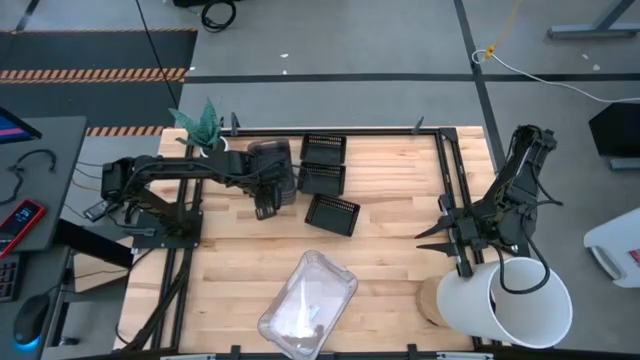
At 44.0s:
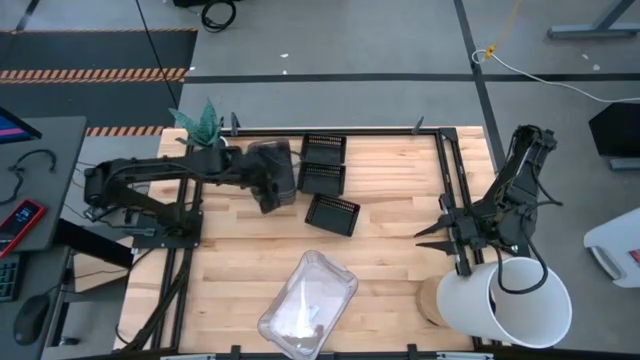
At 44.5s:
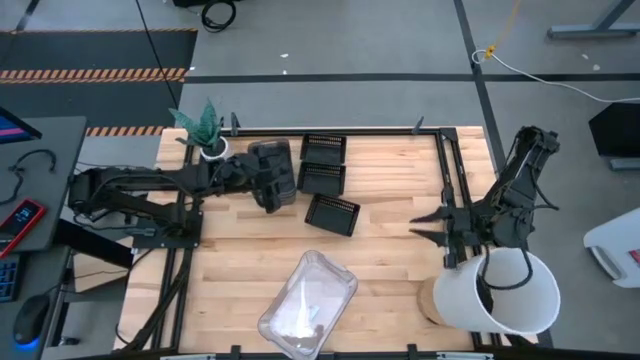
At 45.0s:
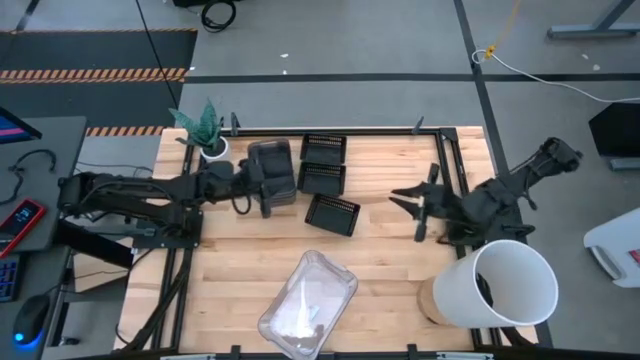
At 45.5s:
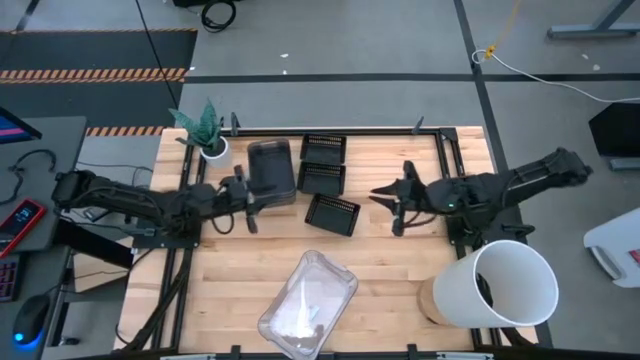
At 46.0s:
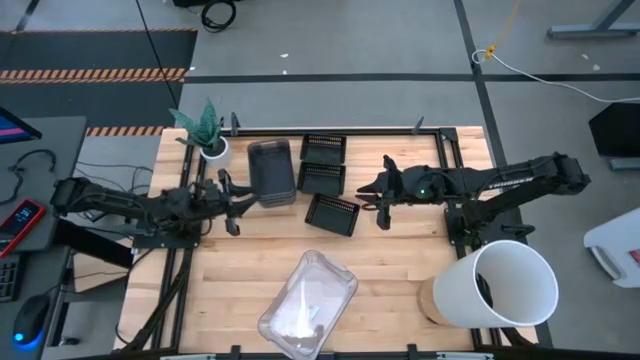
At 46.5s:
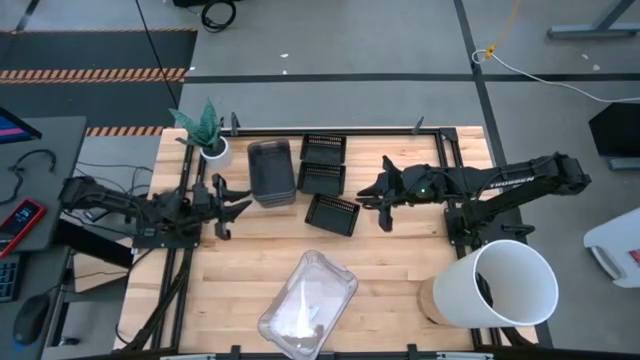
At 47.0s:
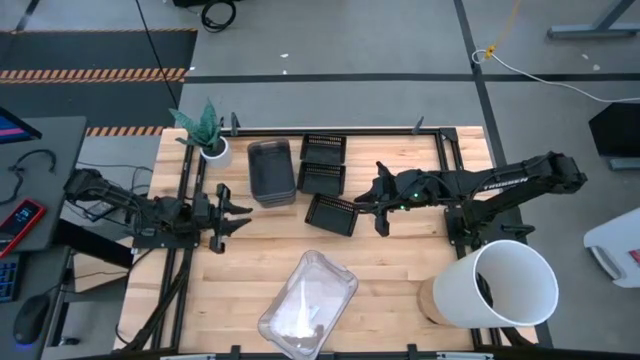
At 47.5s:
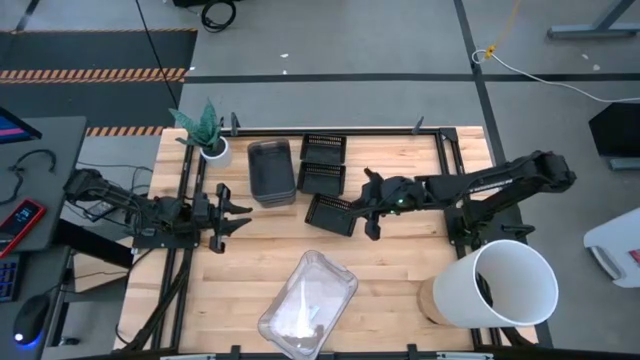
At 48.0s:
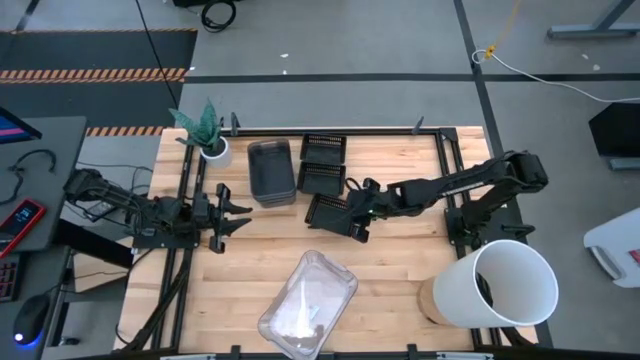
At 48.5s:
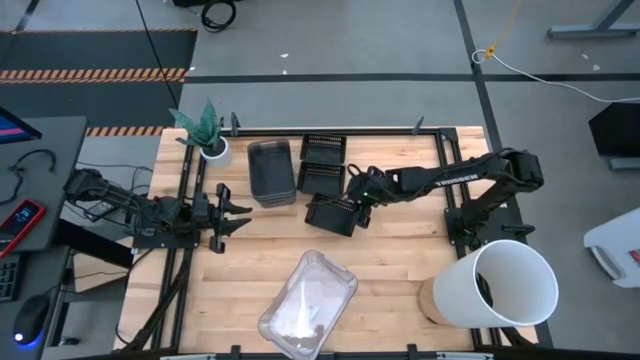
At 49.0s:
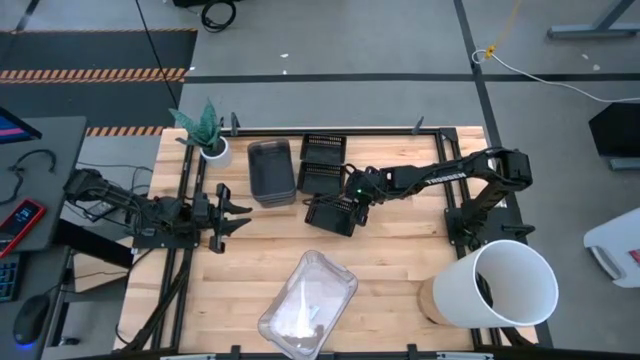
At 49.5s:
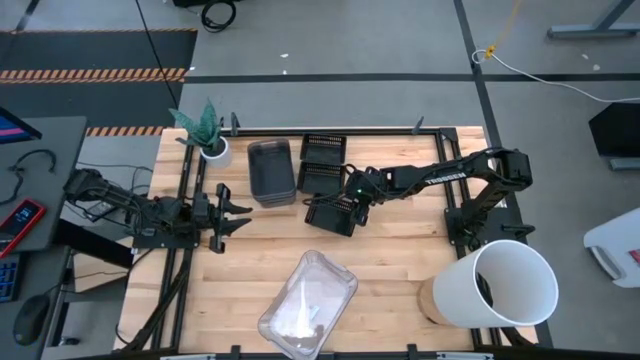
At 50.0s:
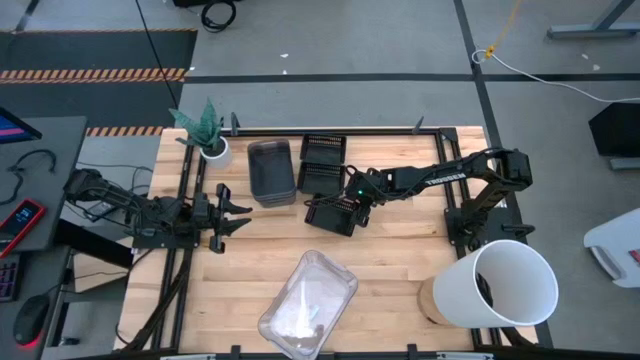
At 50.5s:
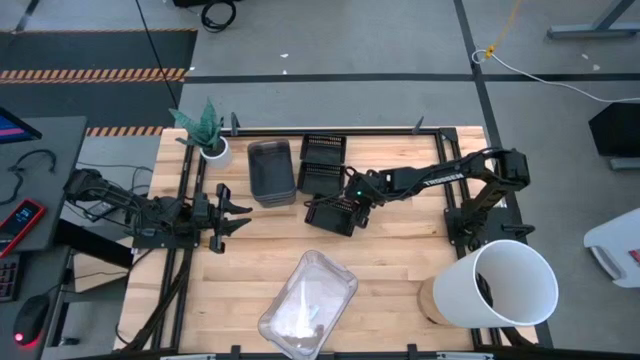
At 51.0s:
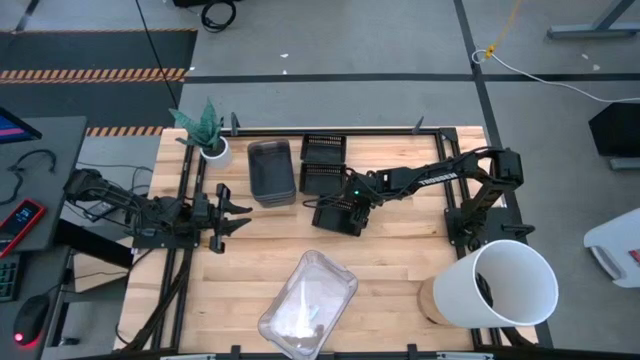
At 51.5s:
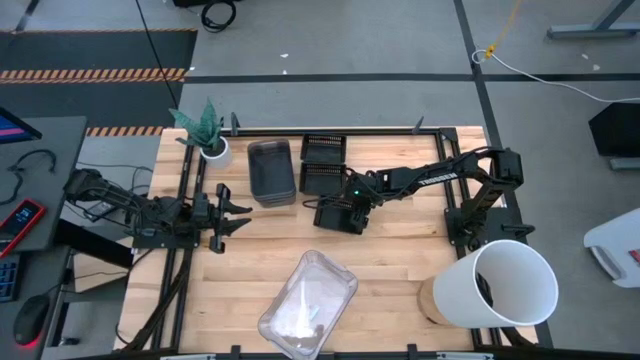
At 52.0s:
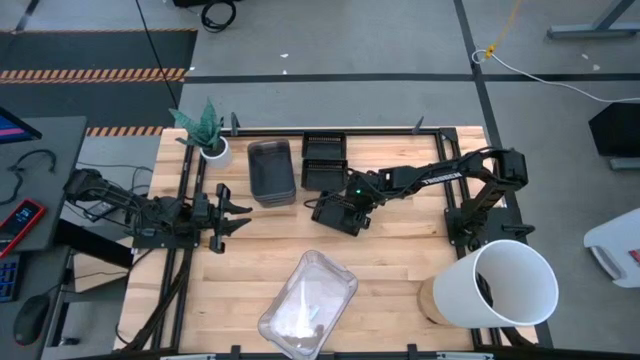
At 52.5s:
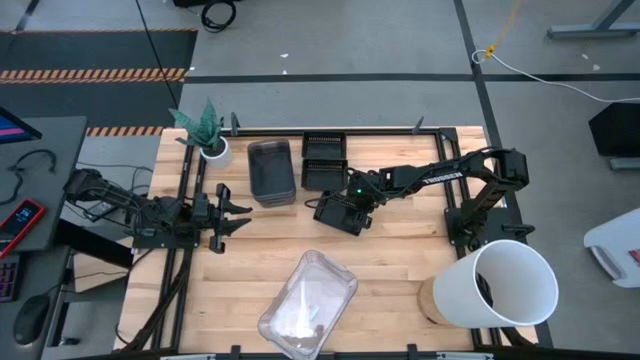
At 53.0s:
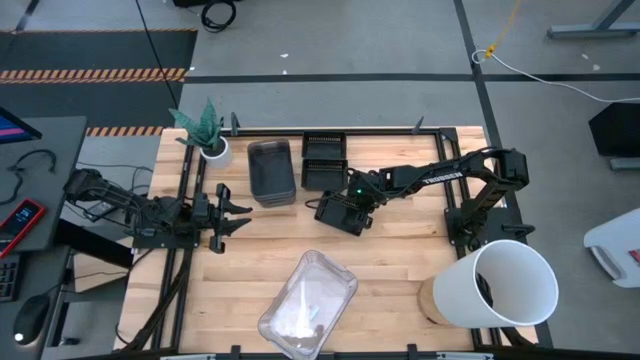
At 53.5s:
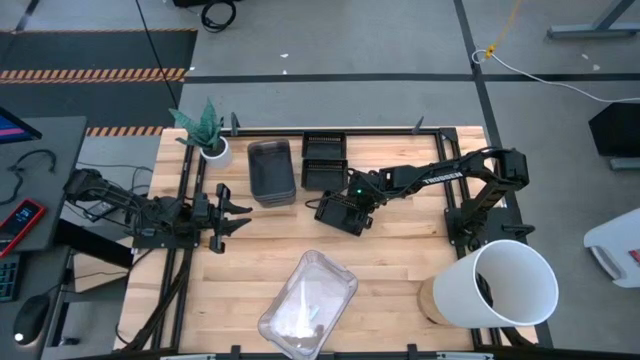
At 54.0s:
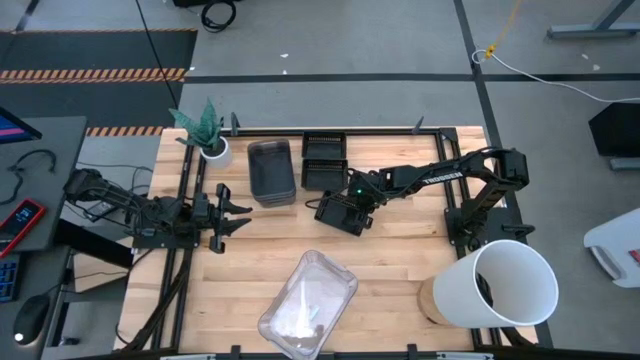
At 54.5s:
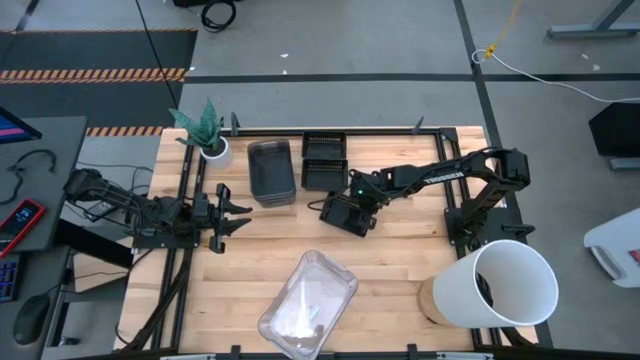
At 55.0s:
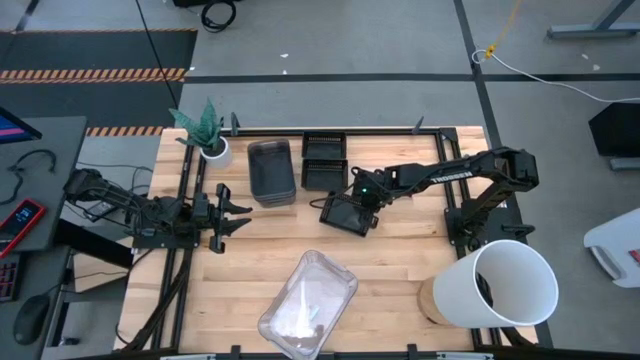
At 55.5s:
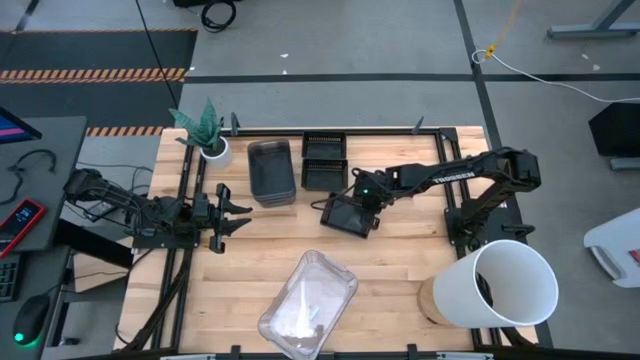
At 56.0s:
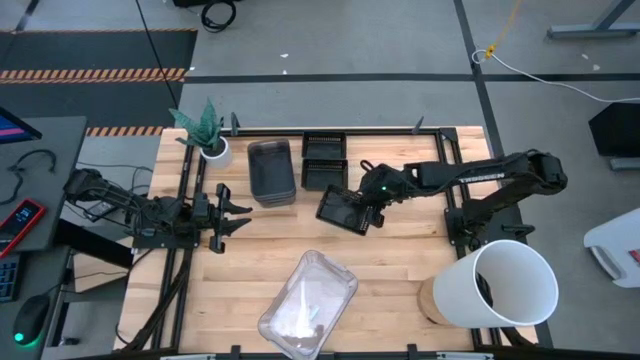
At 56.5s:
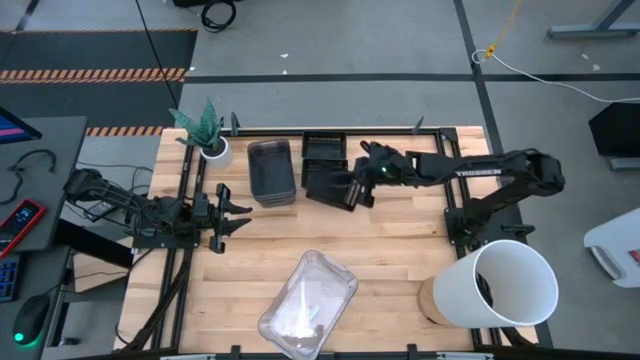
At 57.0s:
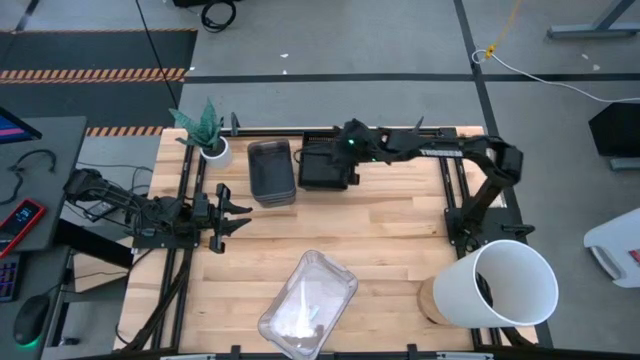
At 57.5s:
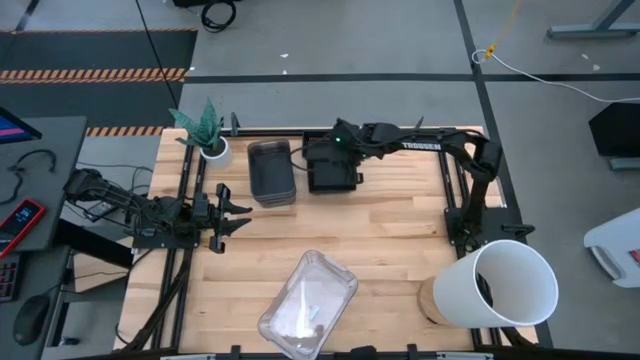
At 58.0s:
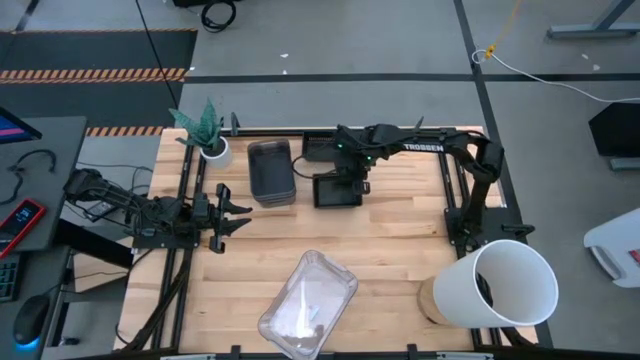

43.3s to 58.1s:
Stack the bottom black bin on top of the middle black bin
